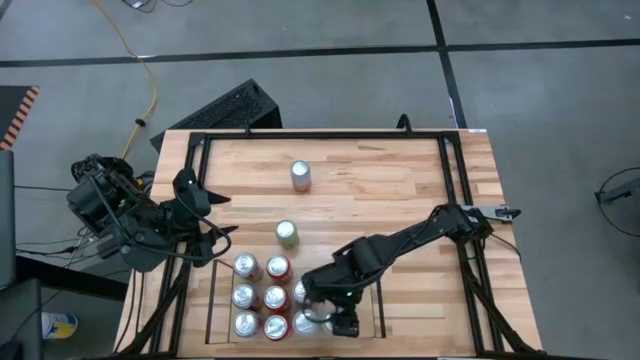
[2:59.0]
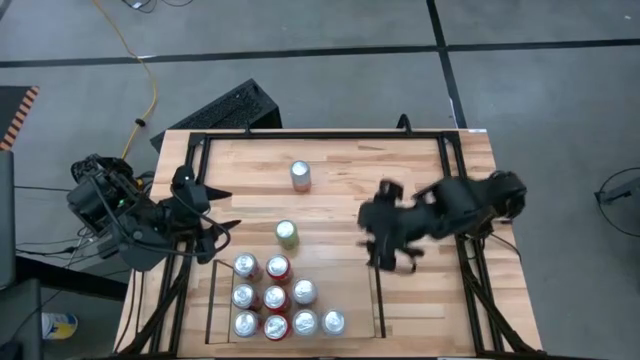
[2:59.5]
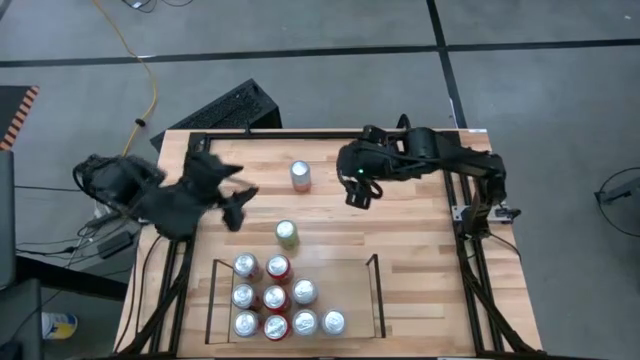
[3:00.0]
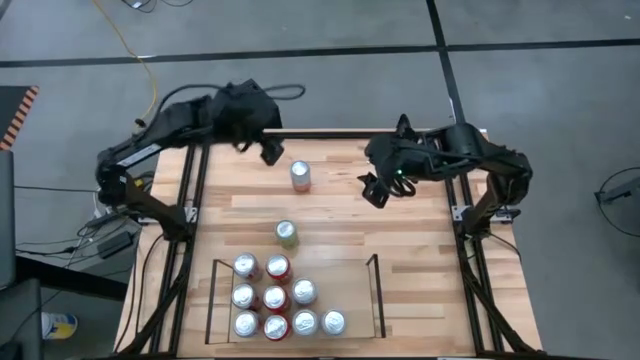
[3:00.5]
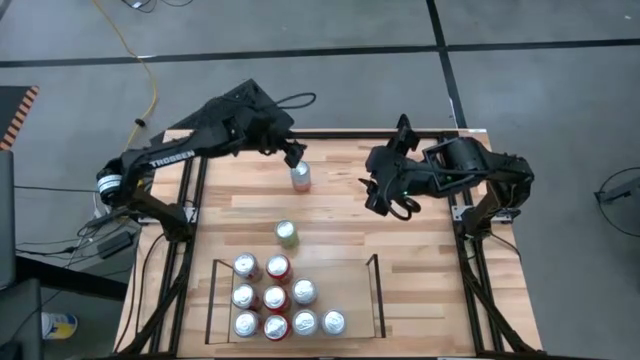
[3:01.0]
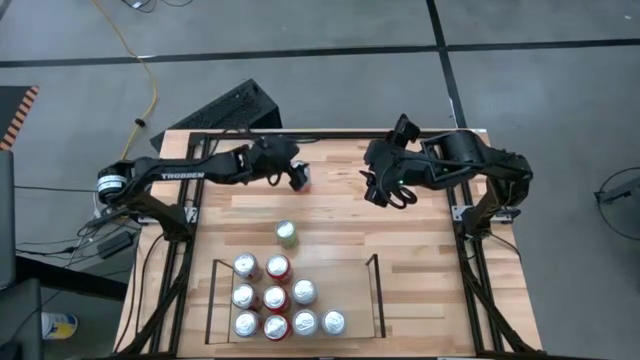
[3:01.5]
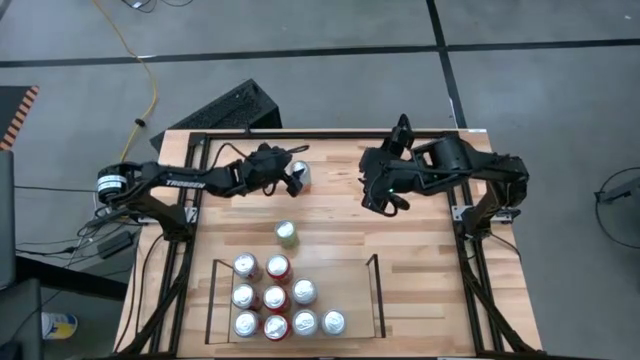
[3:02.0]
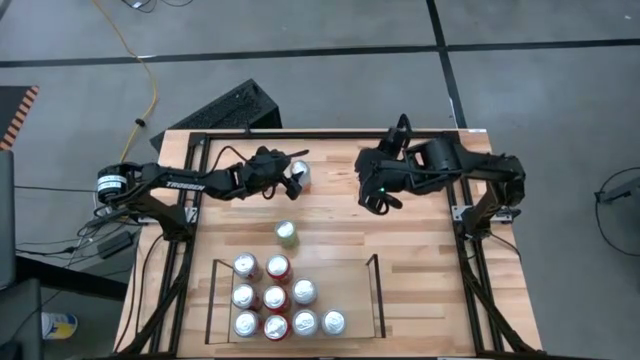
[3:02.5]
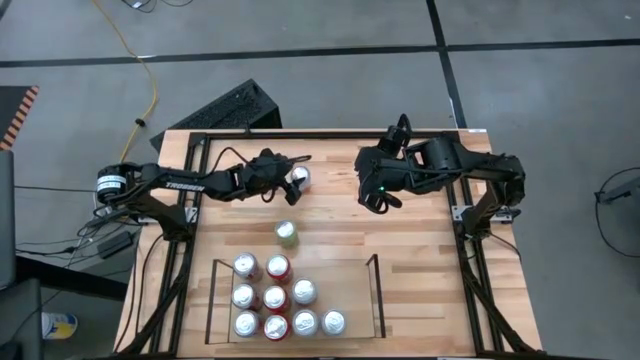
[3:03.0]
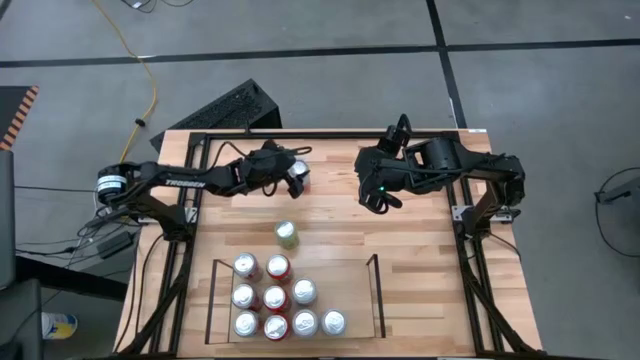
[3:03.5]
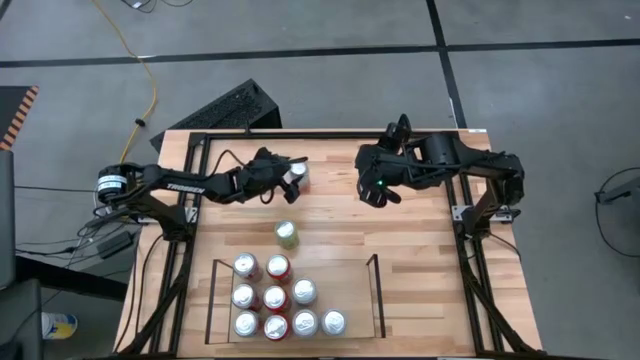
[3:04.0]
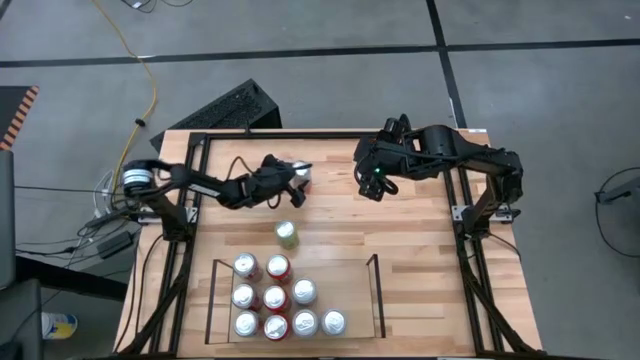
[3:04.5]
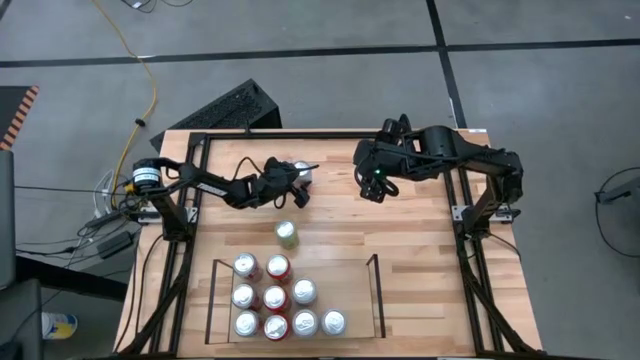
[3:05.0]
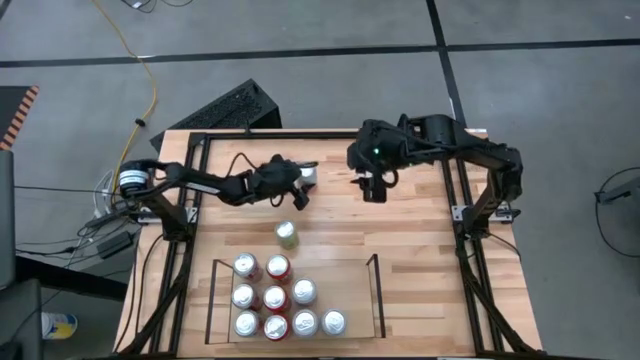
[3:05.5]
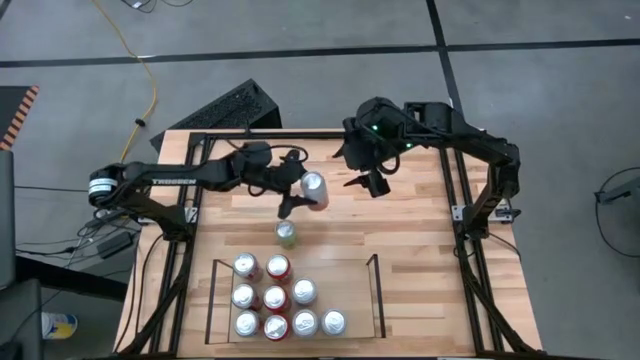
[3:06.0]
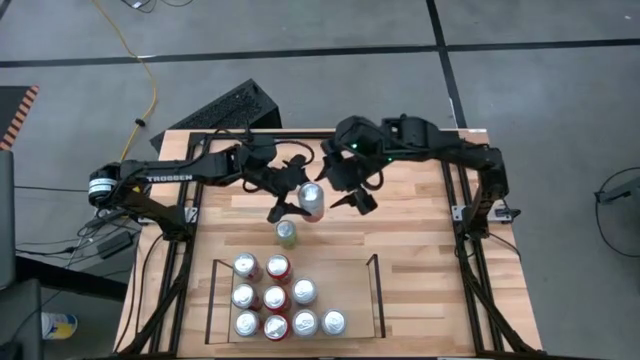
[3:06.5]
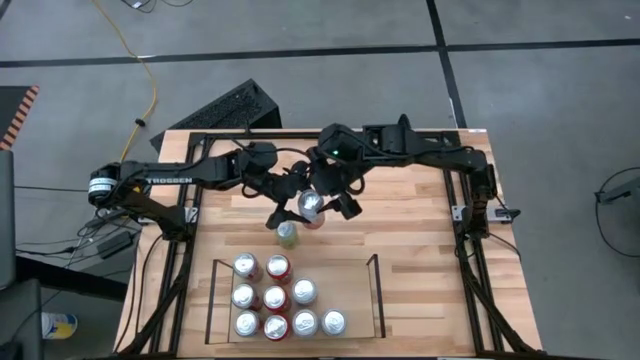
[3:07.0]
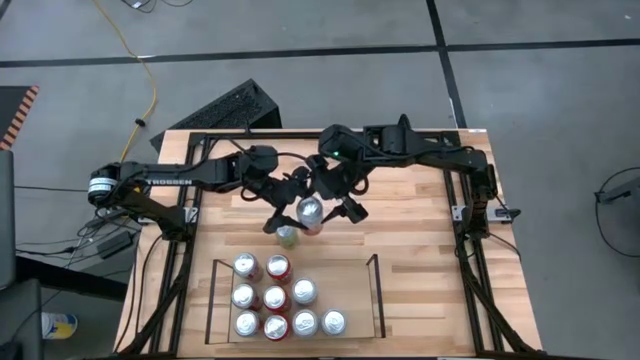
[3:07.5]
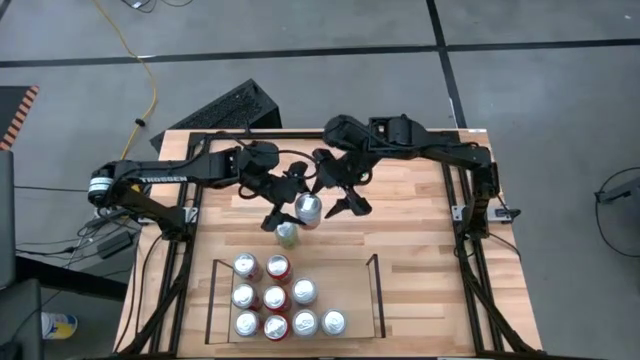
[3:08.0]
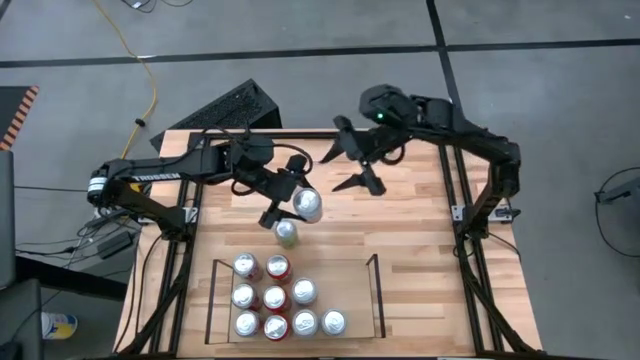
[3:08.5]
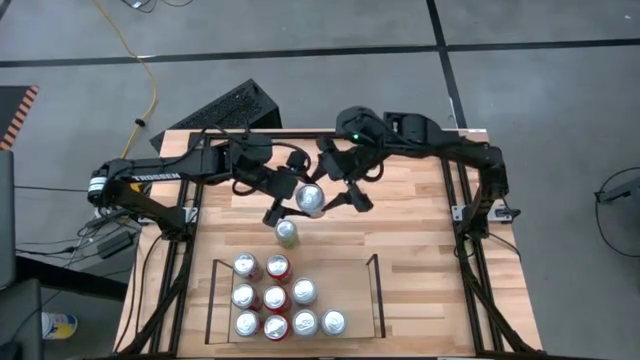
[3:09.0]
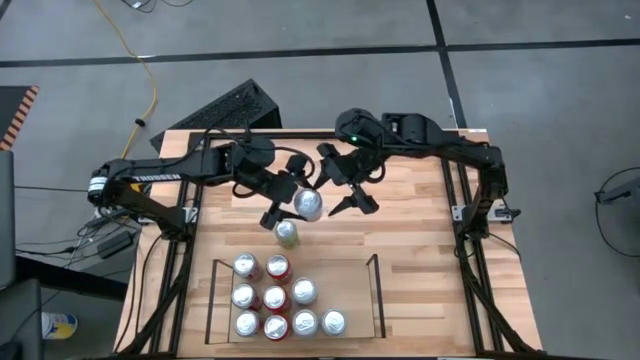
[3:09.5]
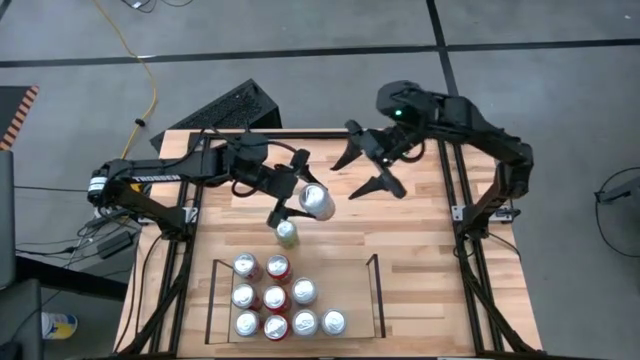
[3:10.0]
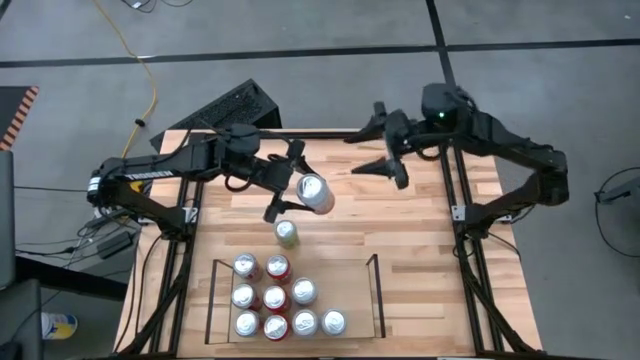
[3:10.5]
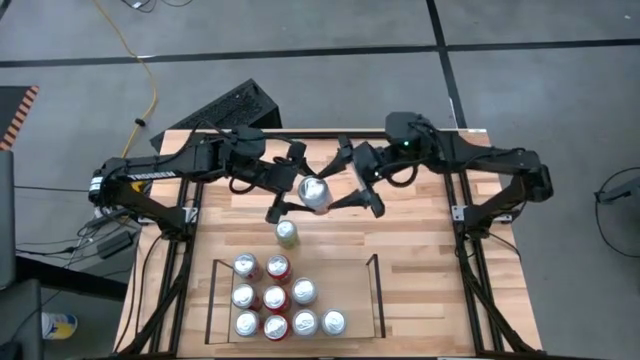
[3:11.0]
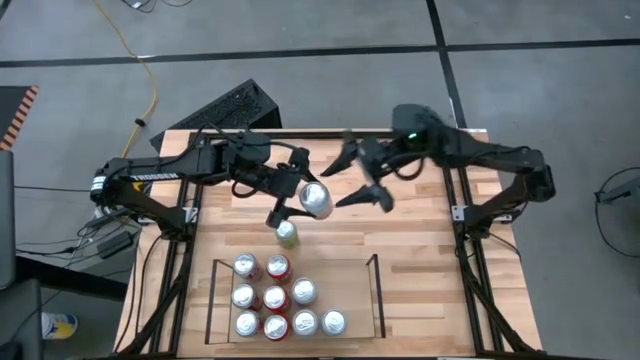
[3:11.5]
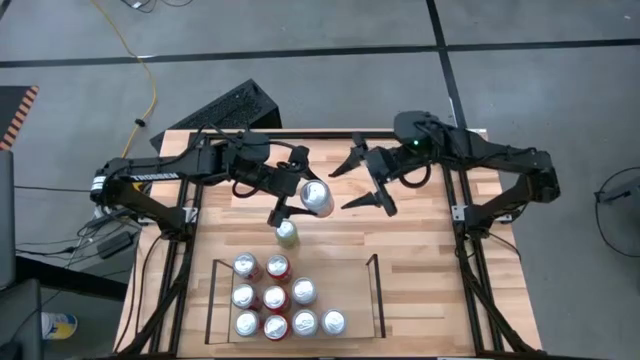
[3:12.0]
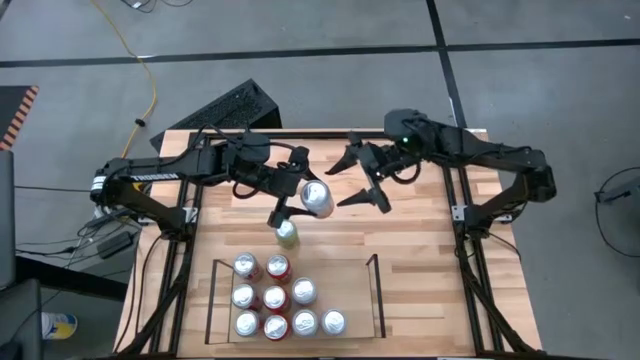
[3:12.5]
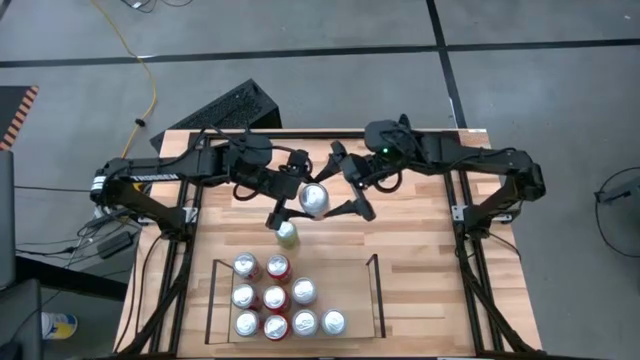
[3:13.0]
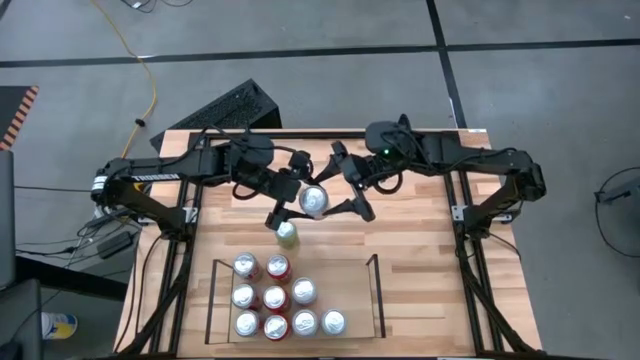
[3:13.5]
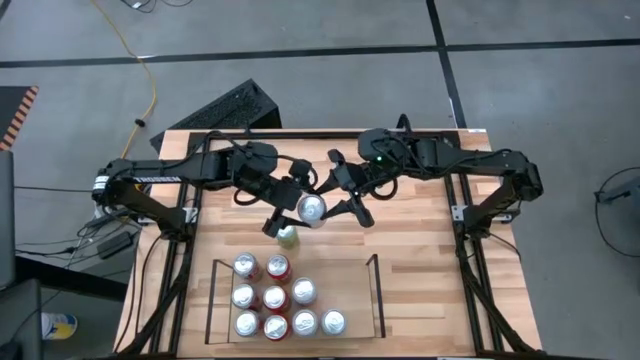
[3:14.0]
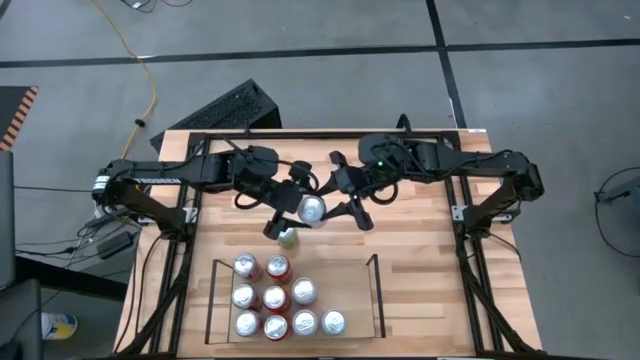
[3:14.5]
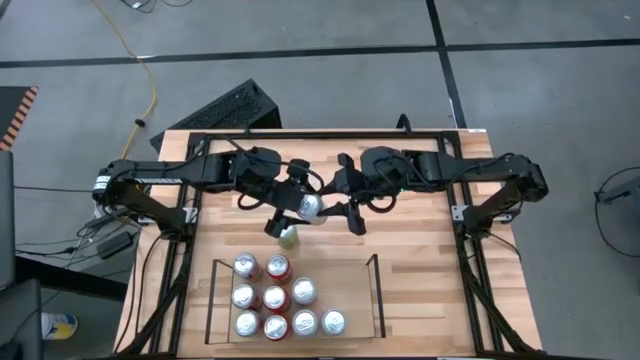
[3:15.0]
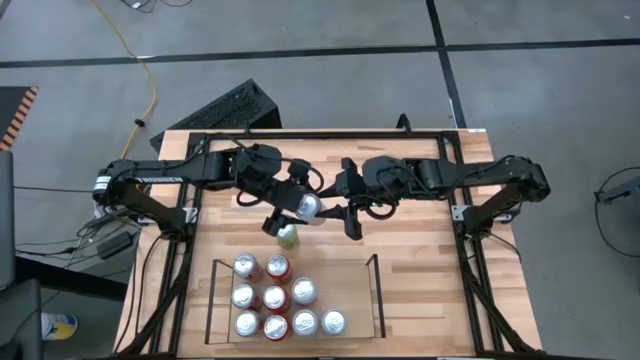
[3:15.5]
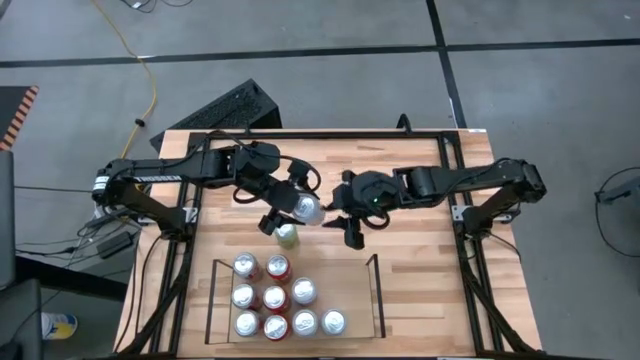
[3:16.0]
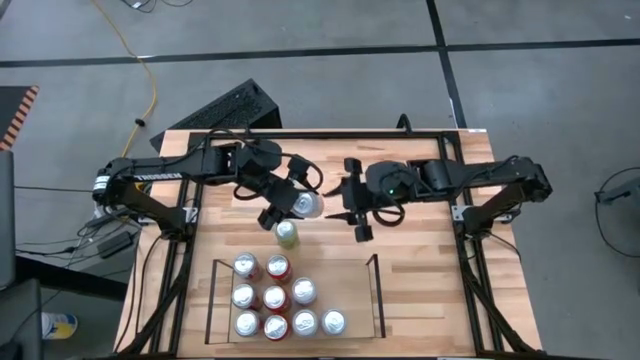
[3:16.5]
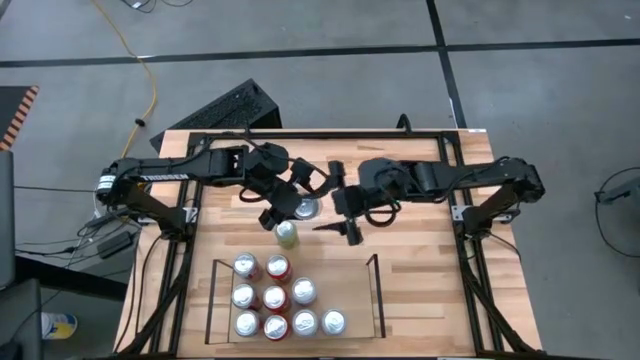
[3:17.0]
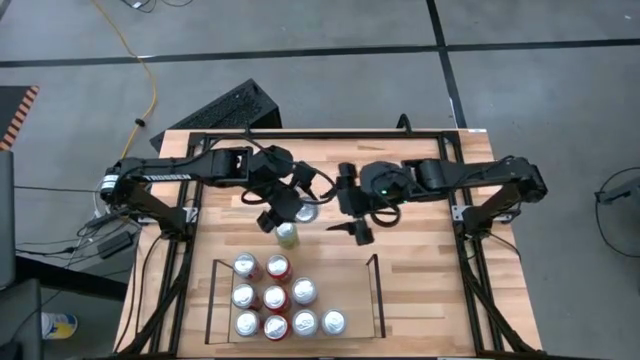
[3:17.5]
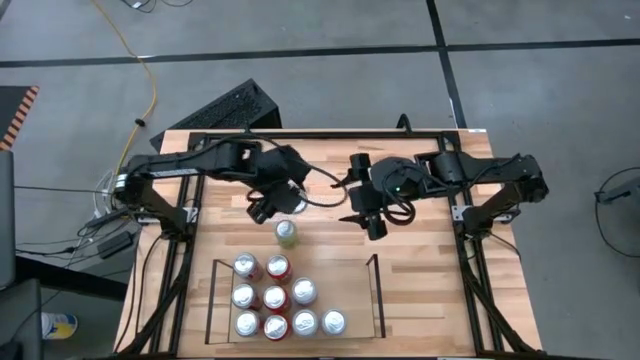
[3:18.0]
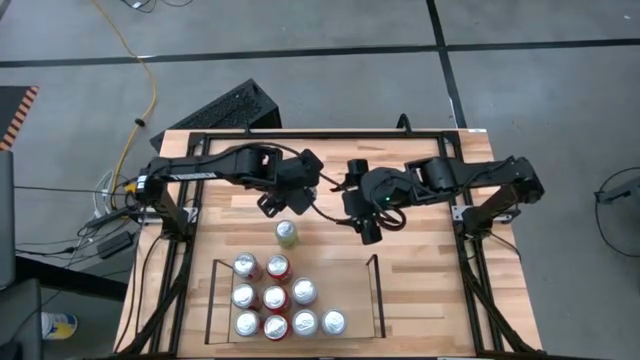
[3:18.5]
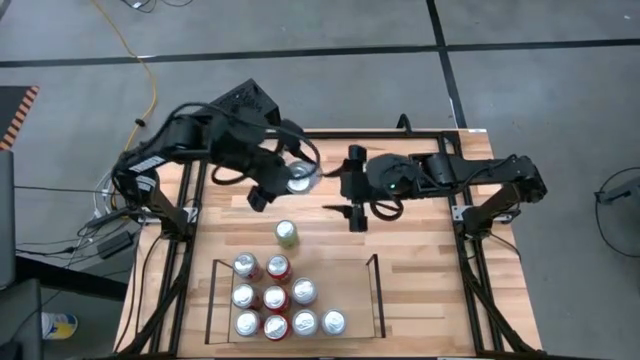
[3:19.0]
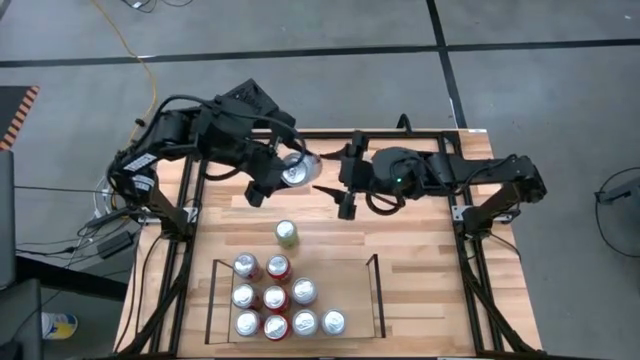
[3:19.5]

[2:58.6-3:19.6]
Task: Place canned beverage on shelf
Put the pink soda can on the shelf aligned with the other pink soda can
